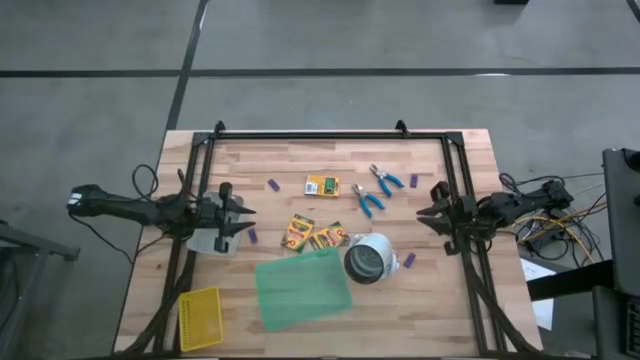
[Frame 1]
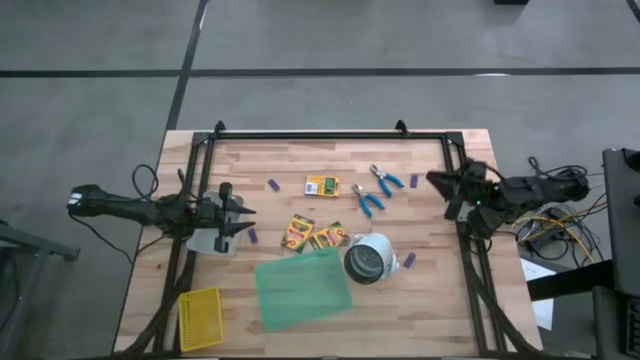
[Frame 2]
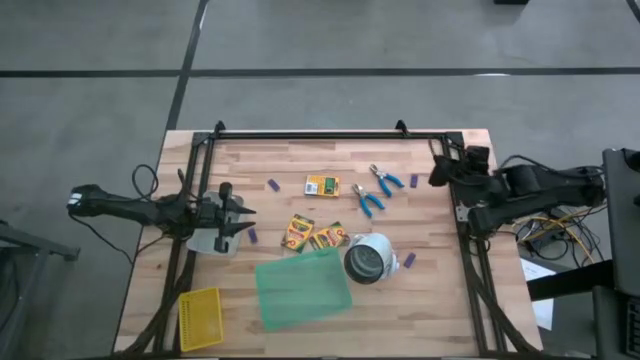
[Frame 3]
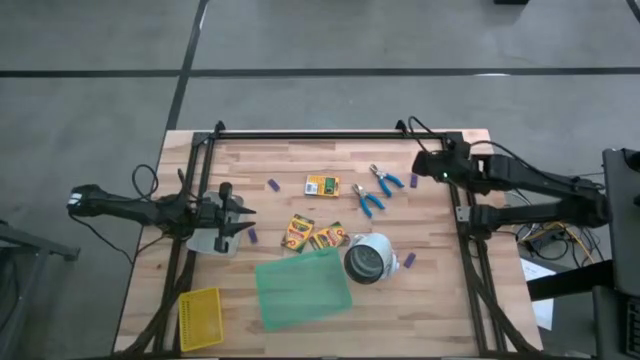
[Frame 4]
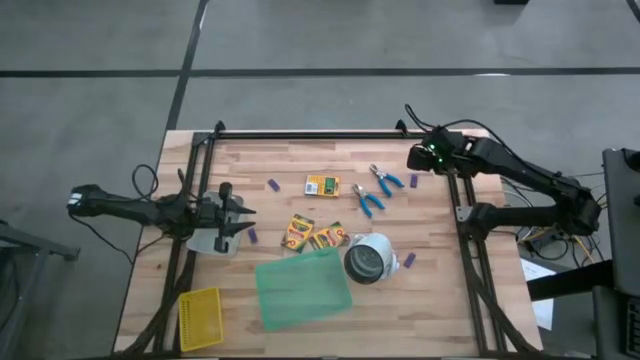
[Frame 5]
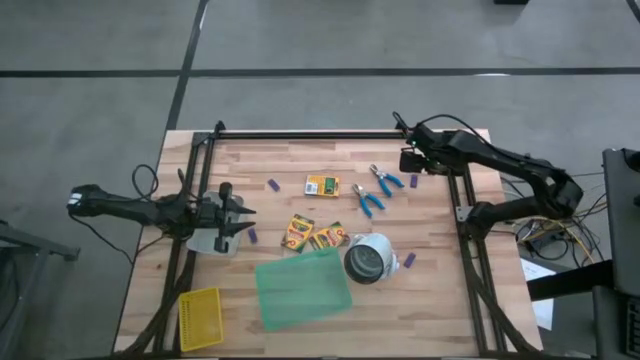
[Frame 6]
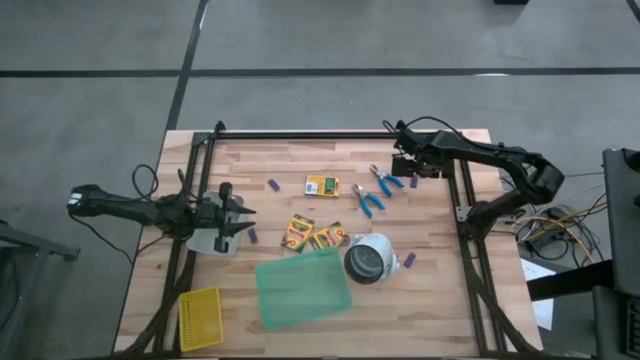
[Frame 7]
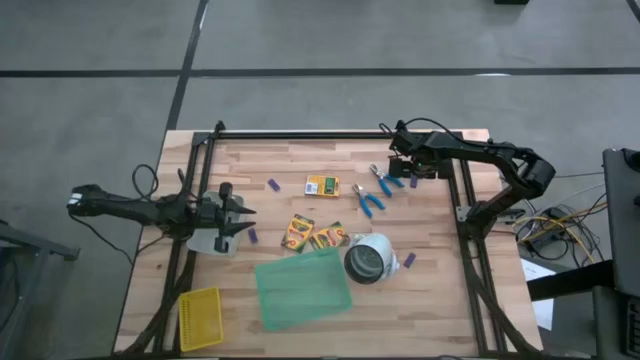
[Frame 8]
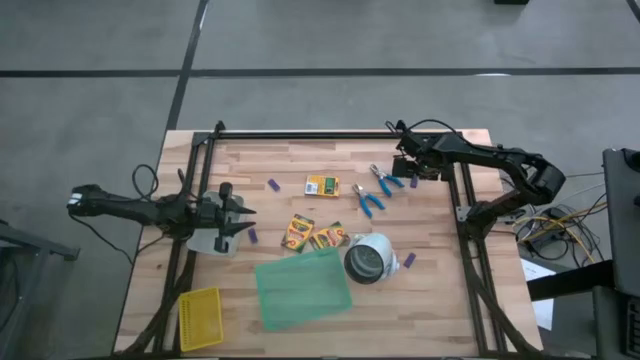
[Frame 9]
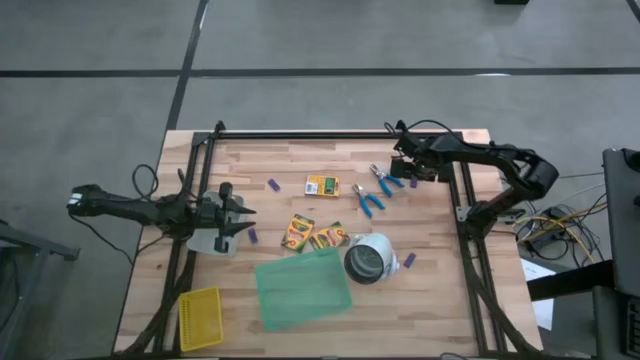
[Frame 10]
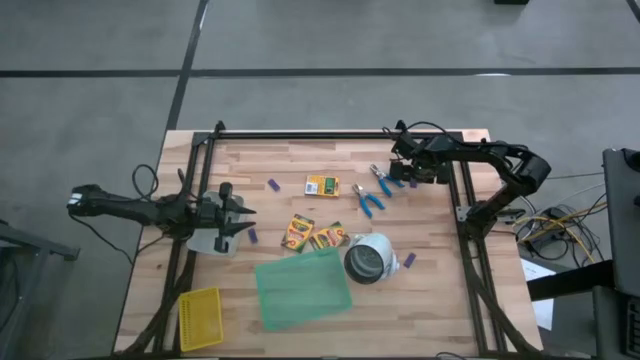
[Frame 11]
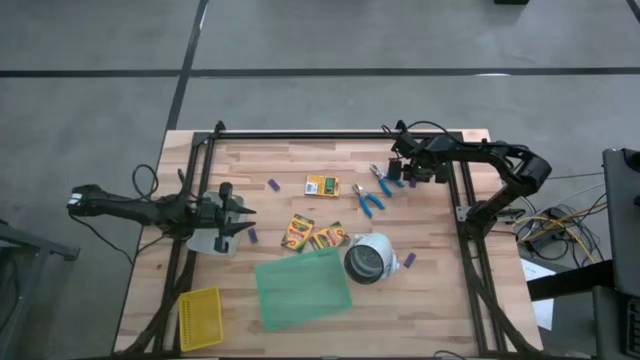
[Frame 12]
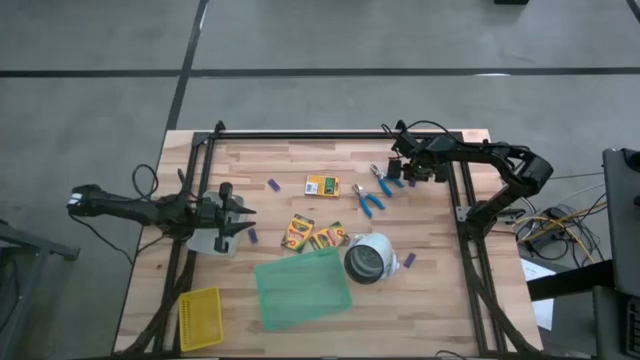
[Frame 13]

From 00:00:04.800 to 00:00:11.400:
Task: Pick & Place School Supplies
Put the blue eraser into the green bin

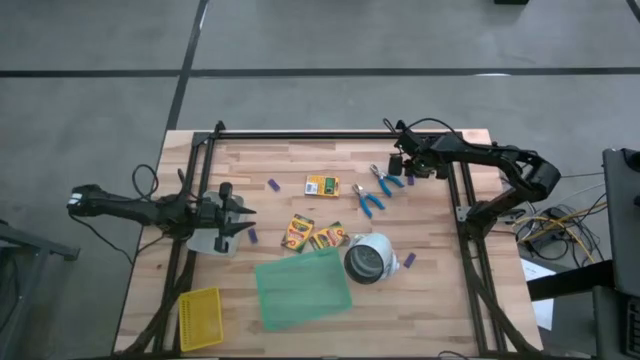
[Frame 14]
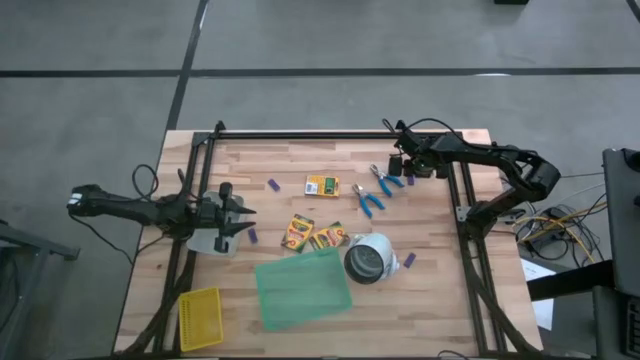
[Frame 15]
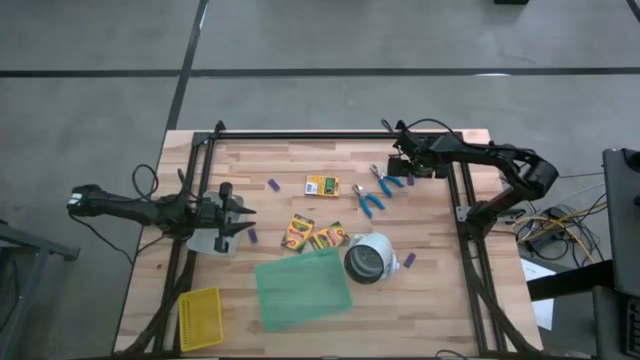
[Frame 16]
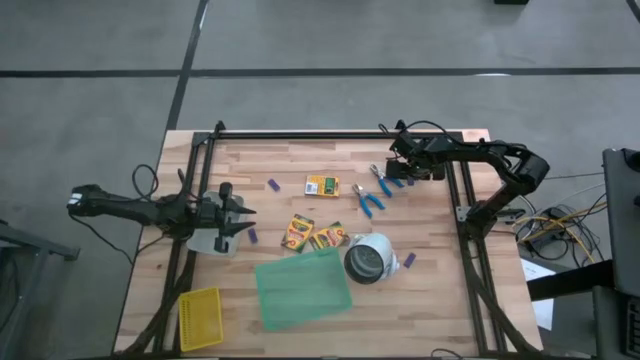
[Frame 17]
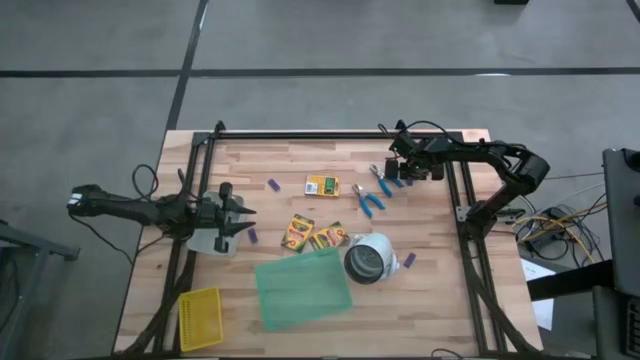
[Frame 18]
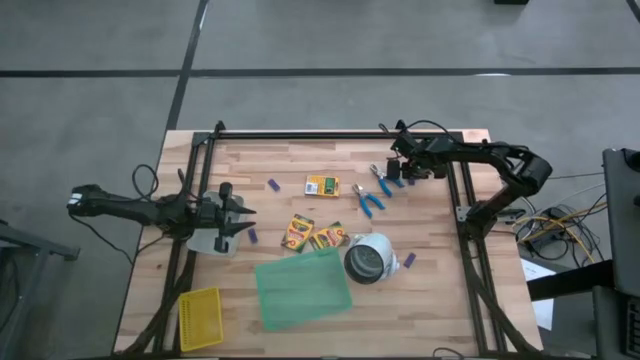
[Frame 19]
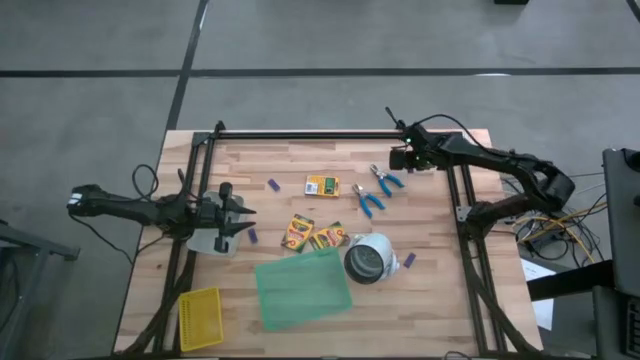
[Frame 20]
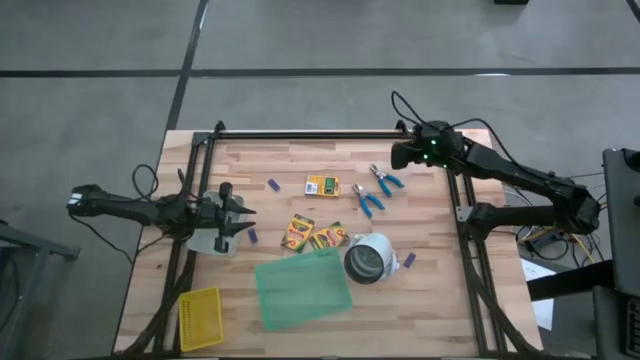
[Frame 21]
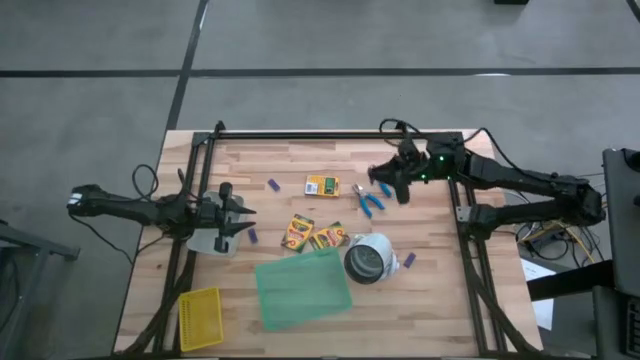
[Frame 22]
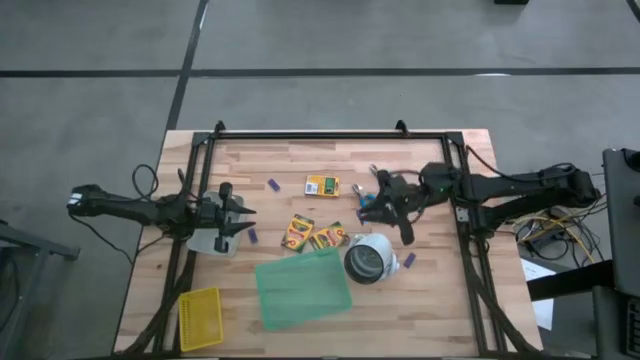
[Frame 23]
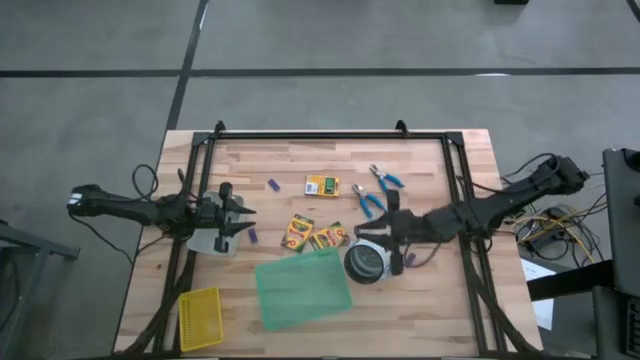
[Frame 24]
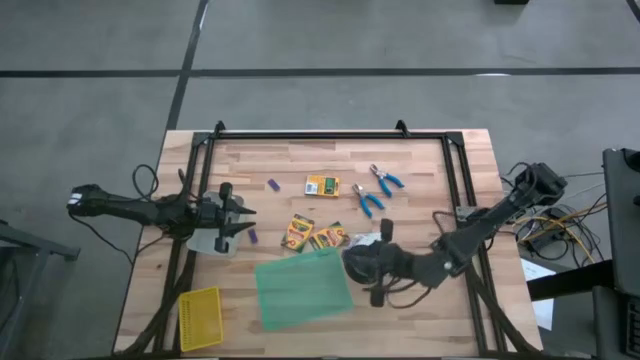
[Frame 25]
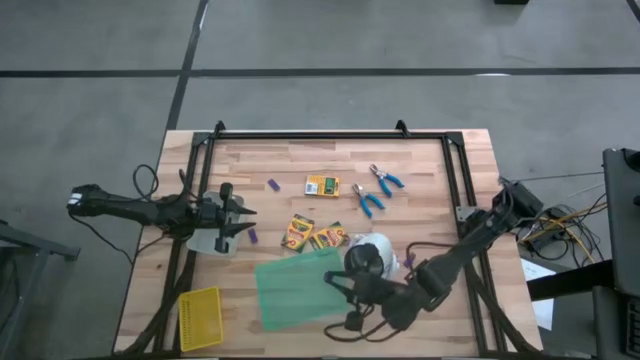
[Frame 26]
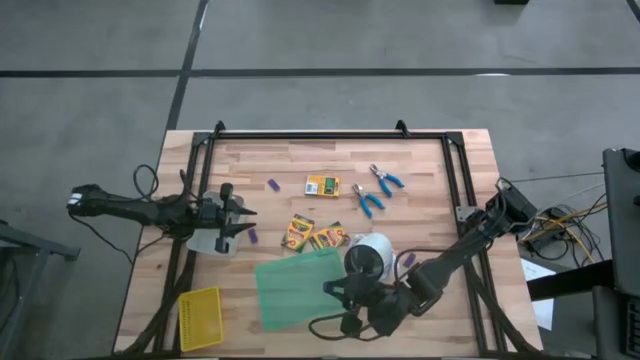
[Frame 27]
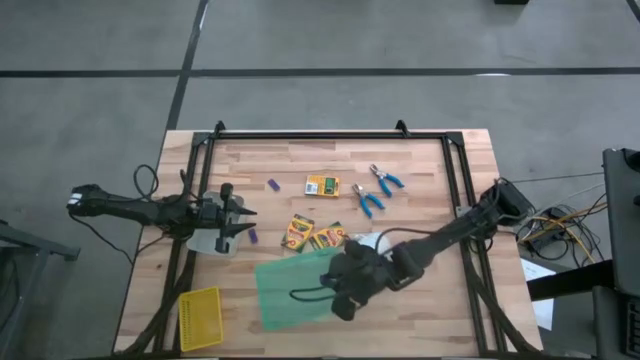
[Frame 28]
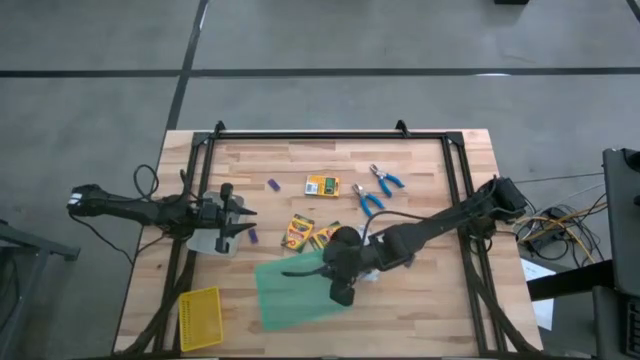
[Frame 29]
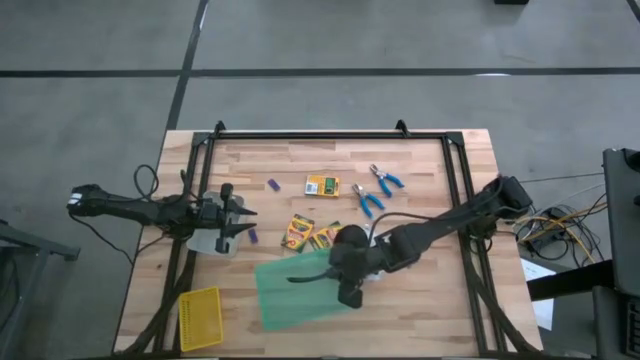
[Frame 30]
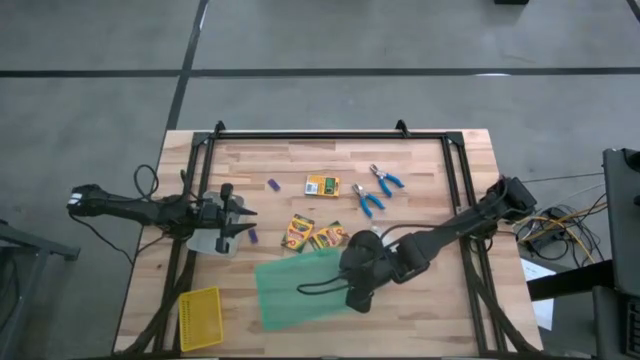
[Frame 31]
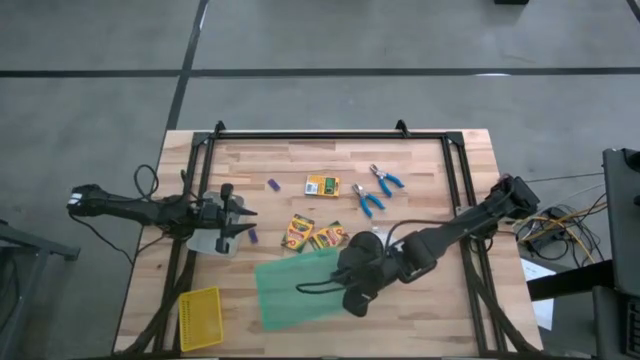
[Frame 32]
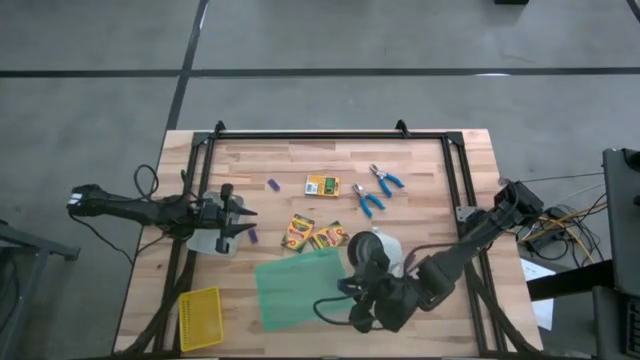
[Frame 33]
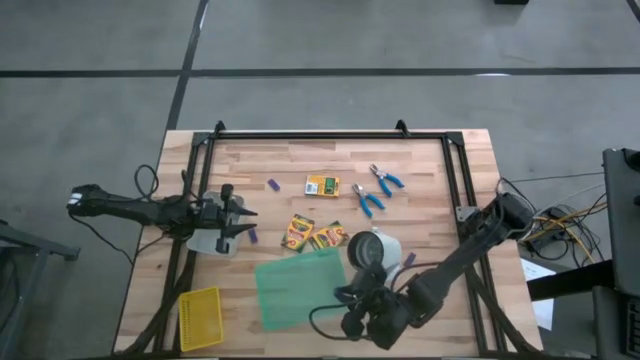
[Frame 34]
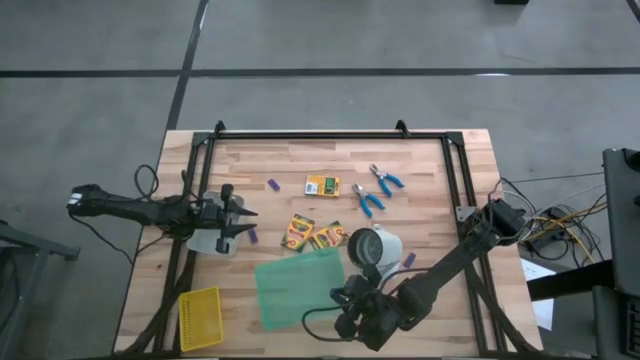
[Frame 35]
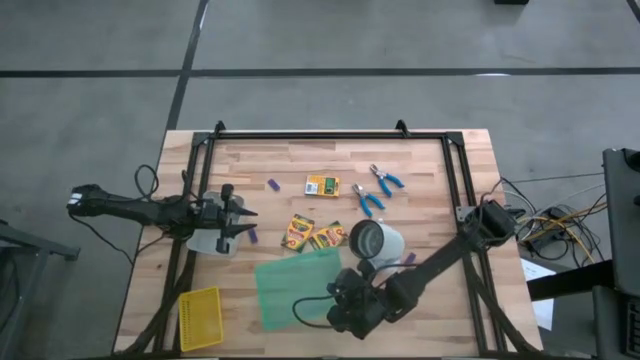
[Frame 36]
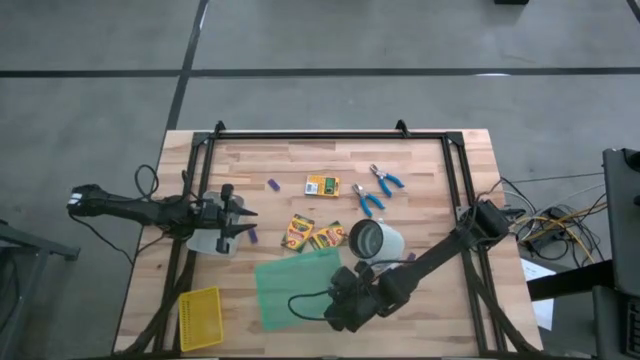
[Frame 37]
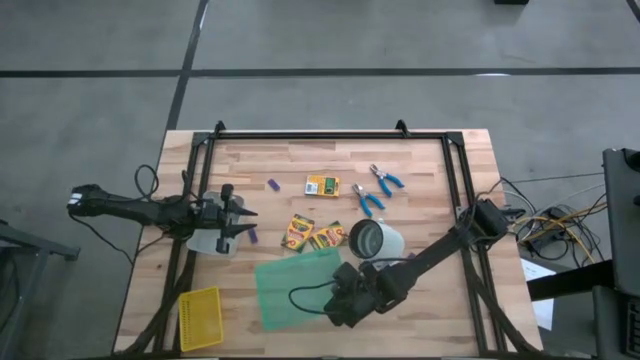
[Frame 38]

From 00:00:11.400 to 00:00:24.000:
Put the blue eraser into the green bin

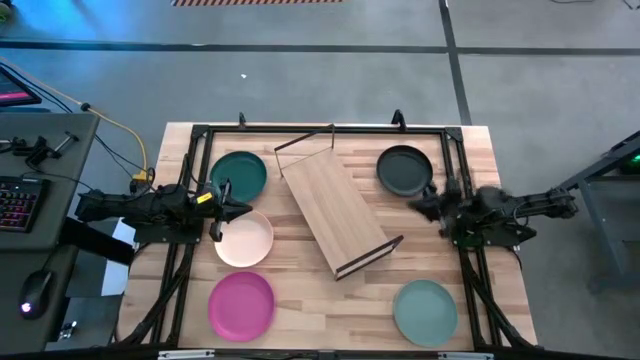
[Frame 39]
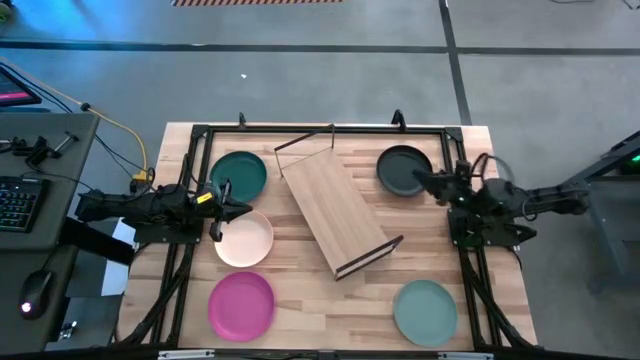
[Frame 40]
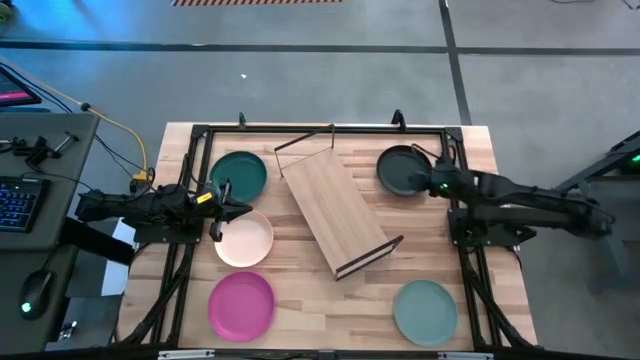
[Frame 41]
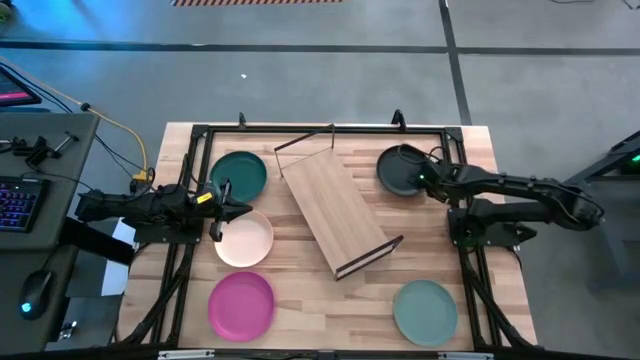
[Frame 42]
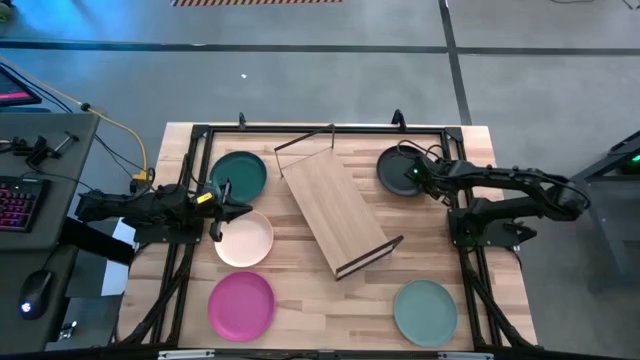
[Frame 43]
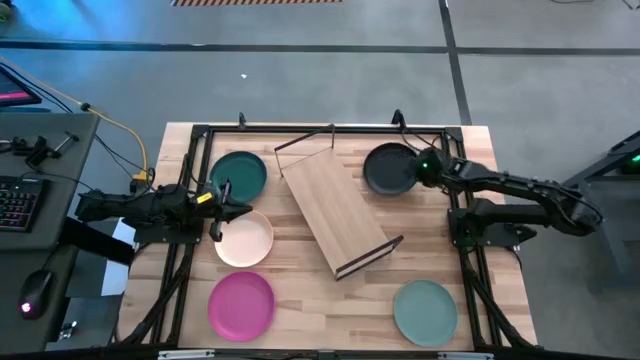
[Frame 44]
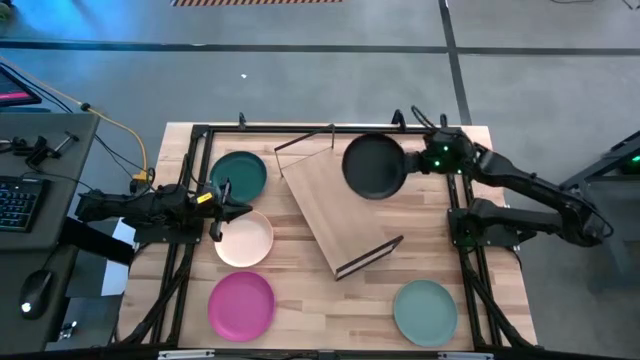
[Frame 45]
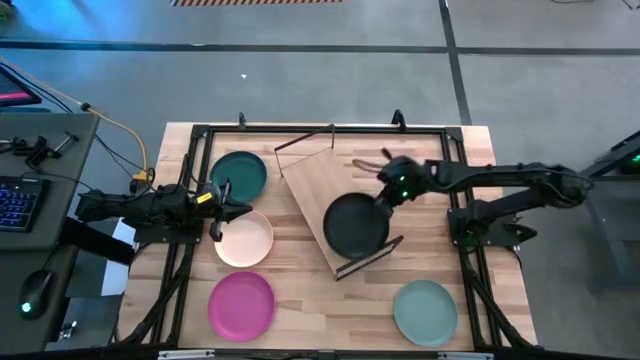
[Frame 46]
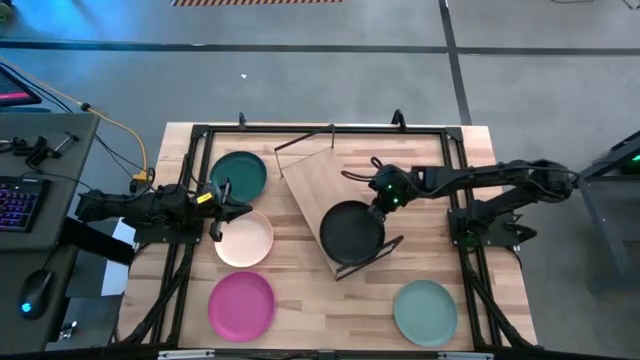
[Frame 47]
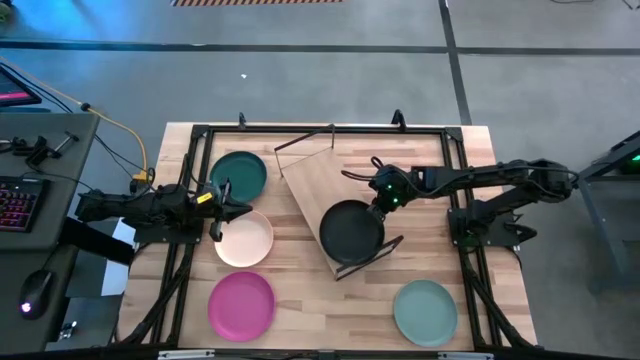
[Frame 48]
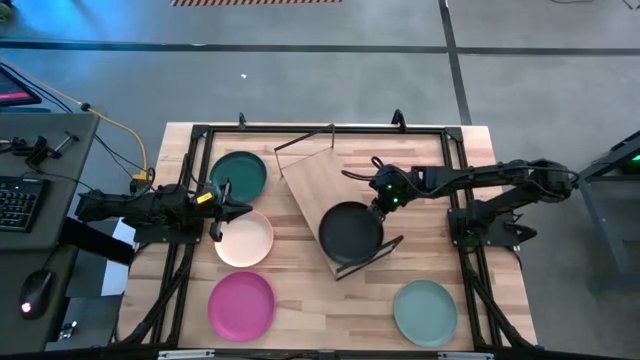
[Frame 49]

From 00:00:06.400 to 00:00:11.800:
Task: Place and stack plates onto a shelf
Put the black plate on the bottom side of the shelf
